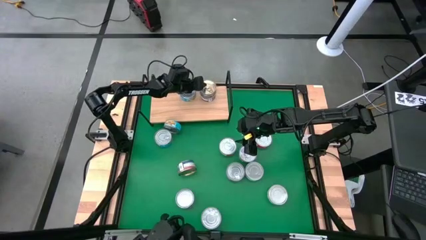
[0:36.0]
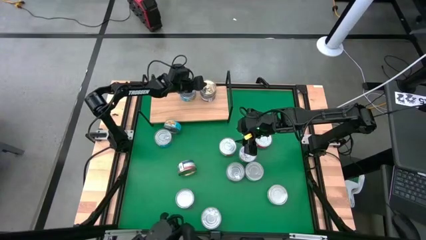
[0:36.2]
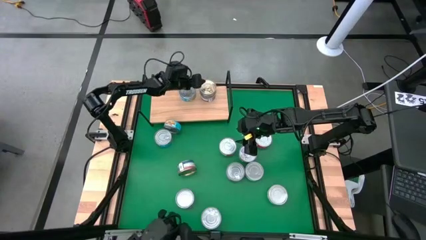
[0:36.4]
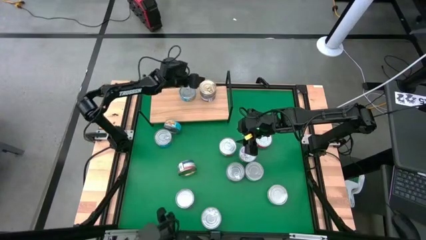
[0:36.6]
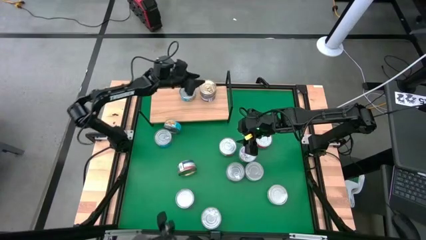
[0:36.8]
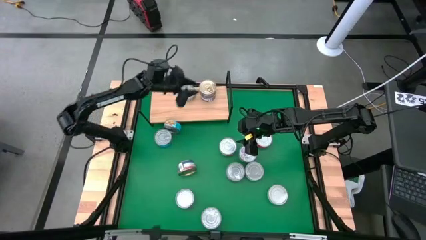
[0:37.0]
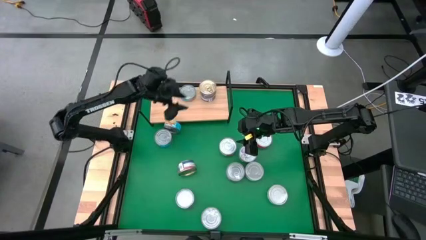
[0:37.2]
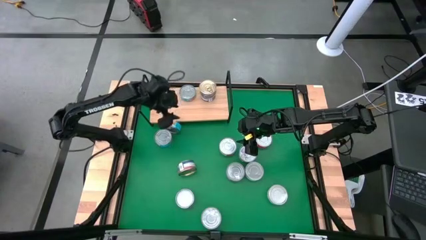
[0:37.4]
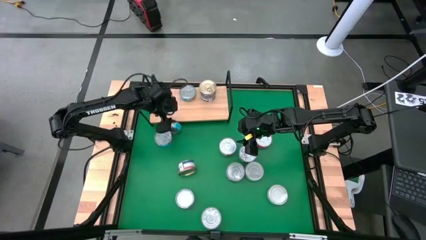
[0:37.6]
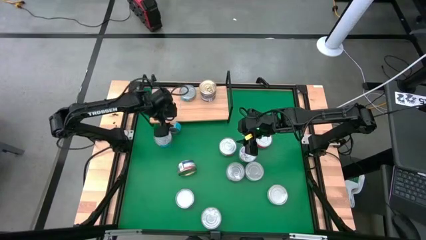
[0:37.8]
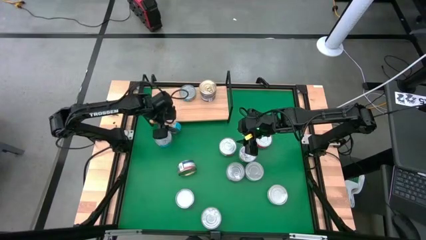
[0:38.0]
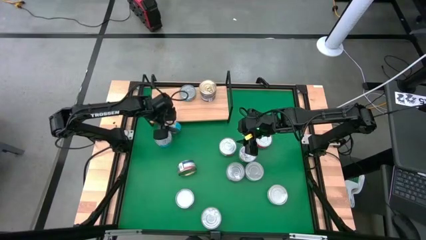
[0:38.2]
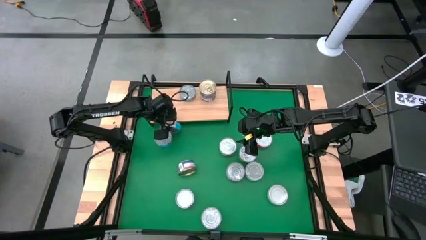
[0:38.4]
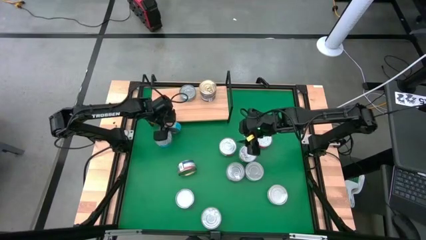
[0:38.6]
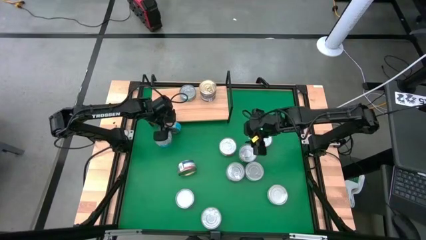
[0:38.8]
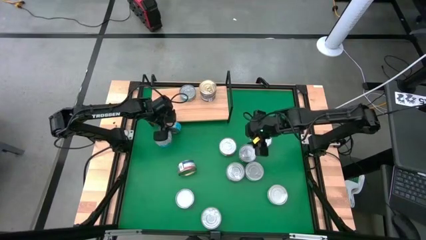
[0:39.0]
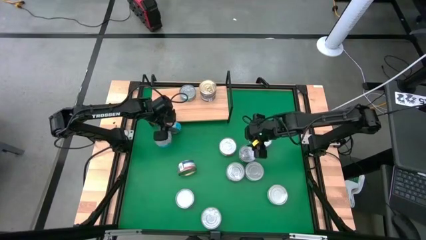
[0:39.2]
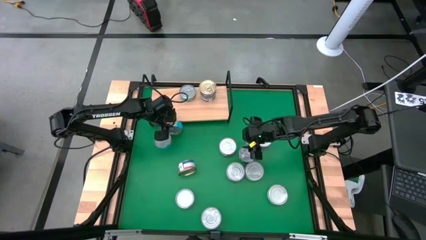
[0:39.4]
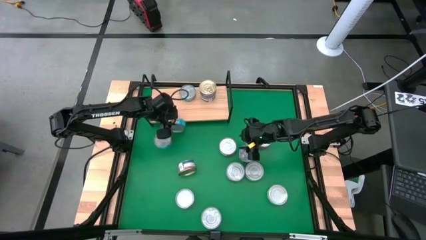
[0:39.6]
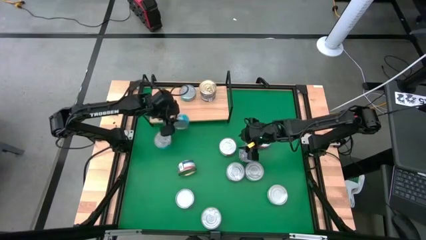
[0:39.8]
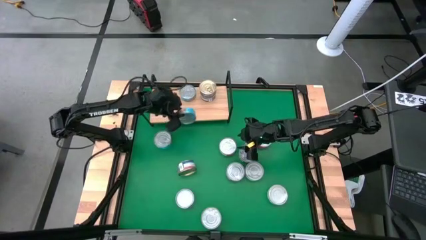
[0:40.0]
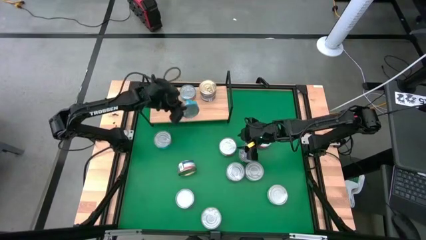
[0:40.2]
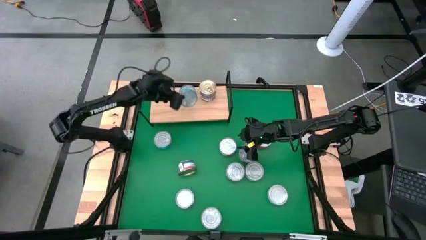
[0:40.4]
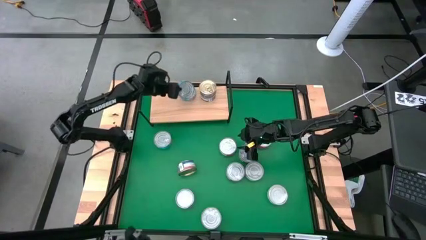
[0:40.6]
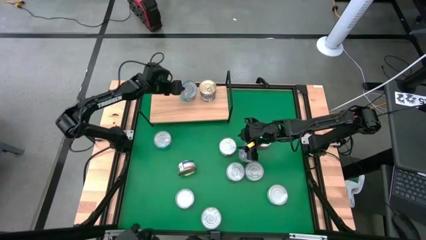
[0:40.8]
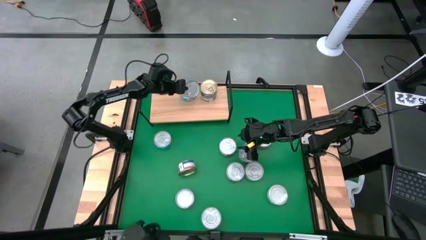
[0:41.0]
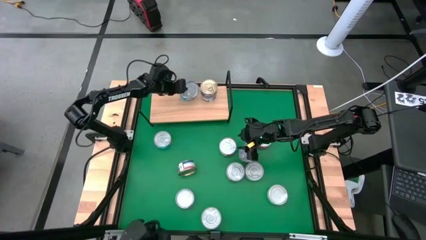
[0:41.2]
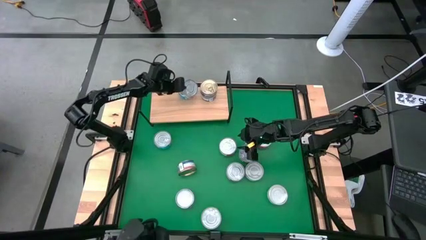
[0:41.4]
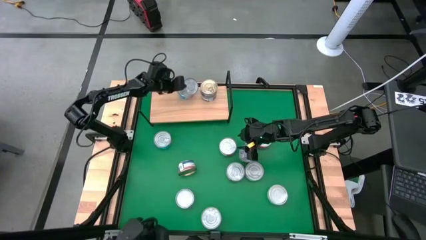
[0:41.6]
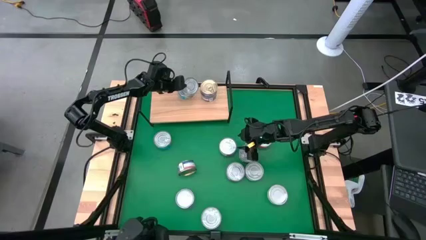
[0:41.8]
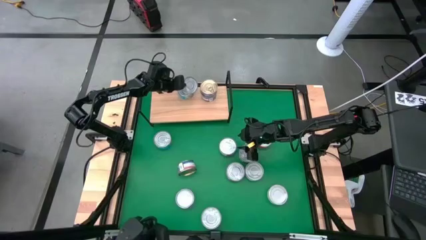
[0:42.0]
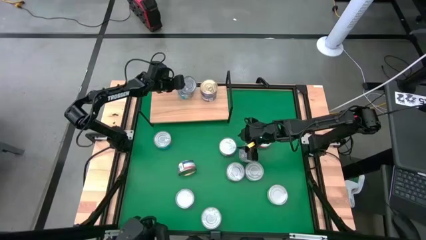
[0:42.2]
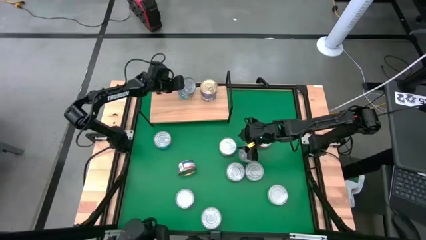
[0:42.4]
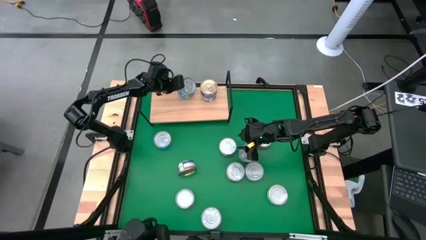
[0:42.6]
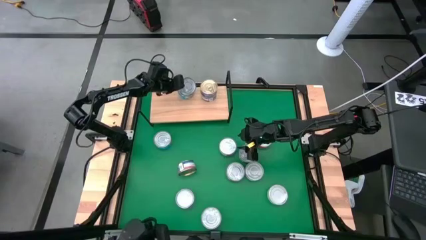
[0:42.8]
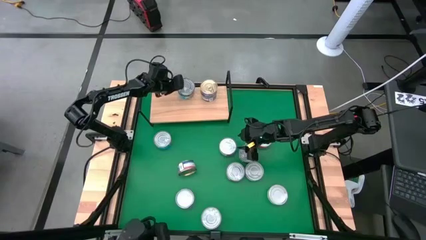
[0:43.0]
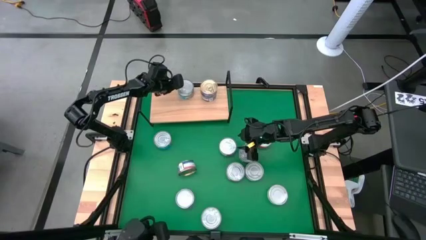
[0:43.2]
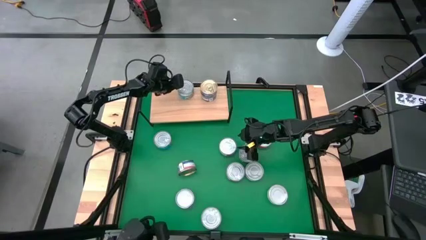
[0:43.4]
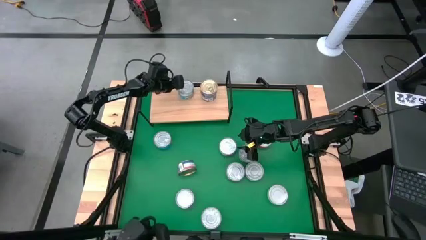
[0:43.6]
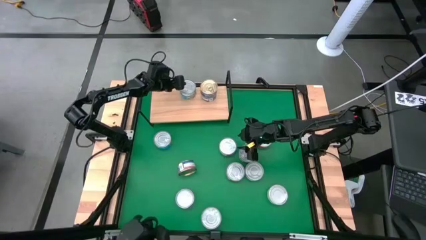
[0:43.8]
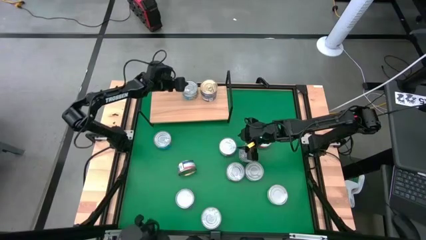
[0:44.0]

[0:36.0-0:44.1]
Task: Stack canned seafood by type on shelf
Stack the yellow blue tuna can on top of the other yellow blue tuna can on the shelf

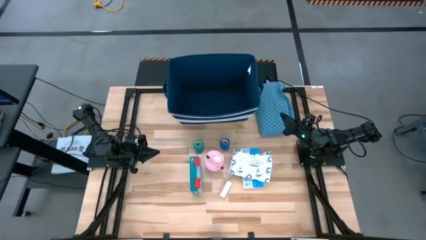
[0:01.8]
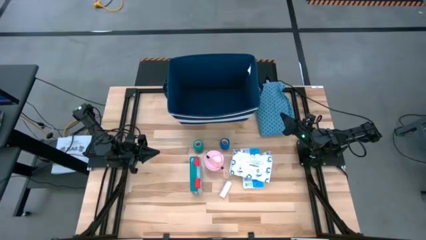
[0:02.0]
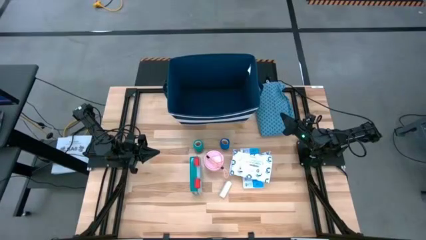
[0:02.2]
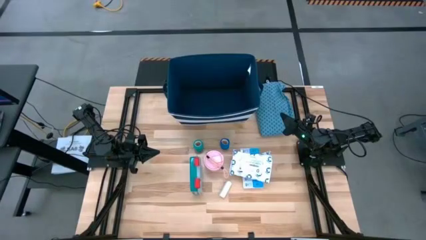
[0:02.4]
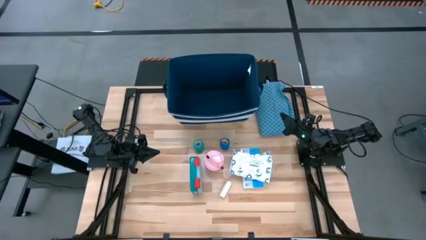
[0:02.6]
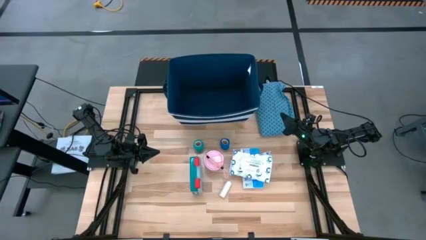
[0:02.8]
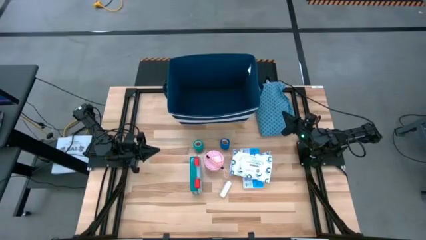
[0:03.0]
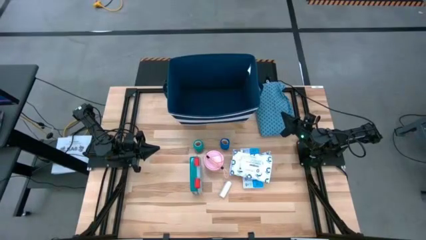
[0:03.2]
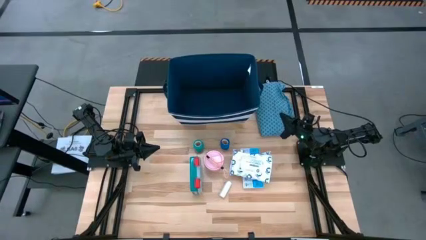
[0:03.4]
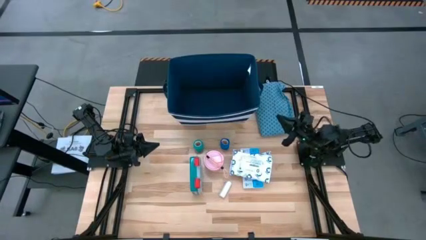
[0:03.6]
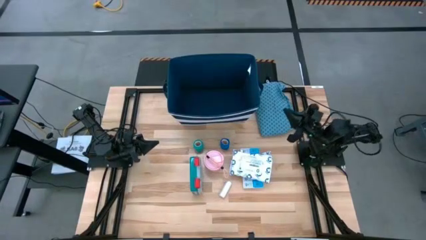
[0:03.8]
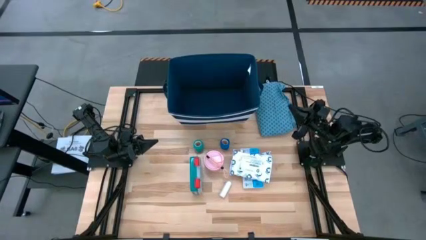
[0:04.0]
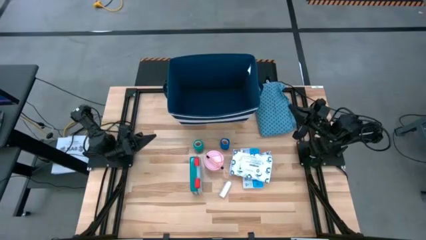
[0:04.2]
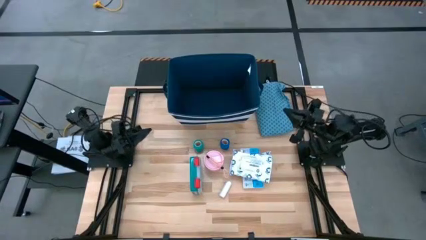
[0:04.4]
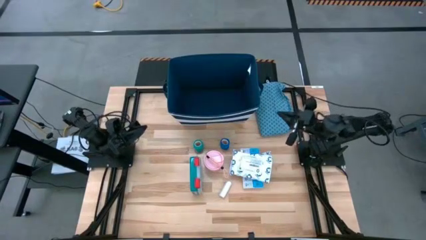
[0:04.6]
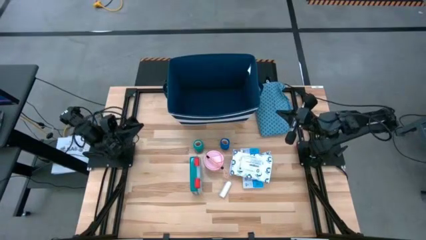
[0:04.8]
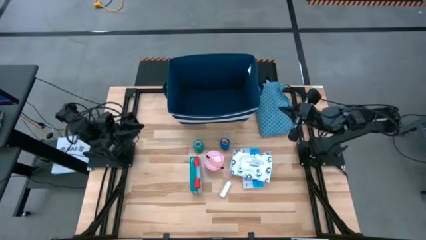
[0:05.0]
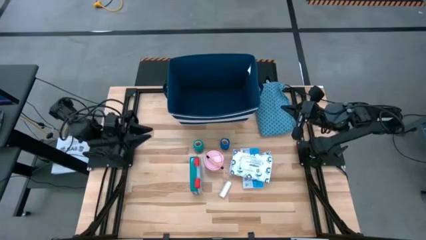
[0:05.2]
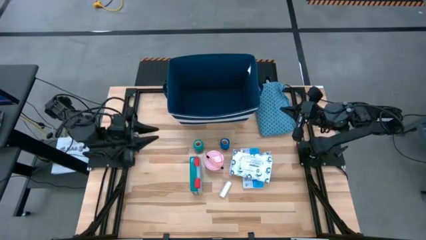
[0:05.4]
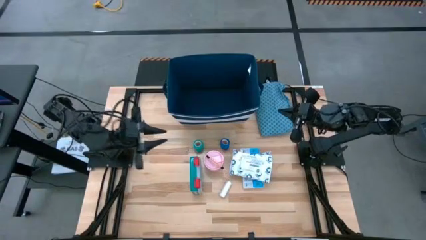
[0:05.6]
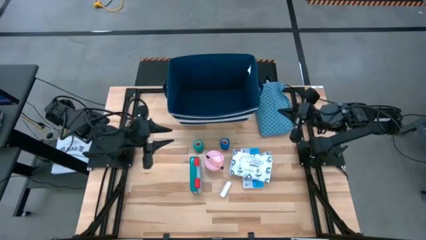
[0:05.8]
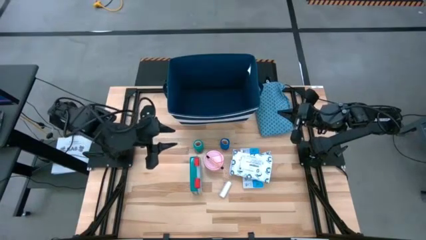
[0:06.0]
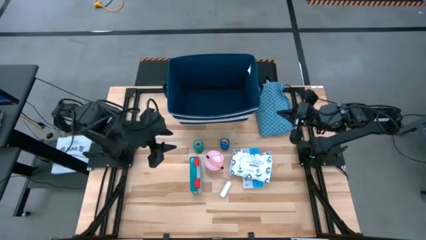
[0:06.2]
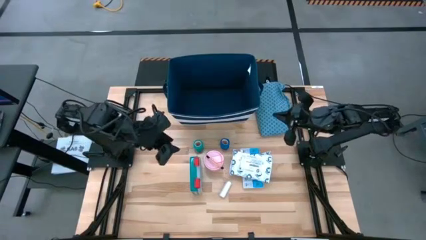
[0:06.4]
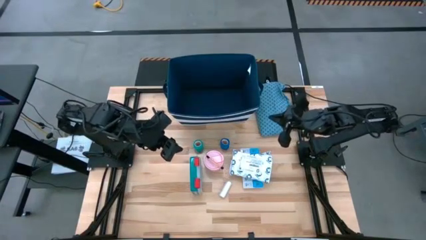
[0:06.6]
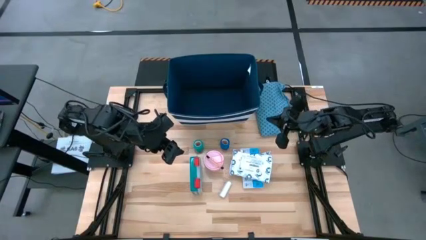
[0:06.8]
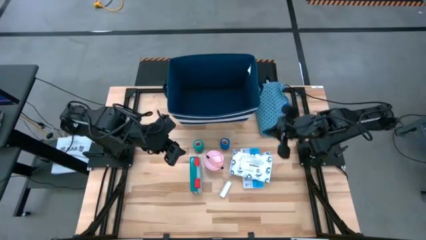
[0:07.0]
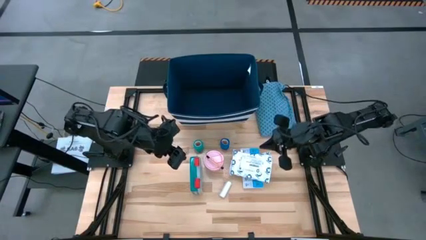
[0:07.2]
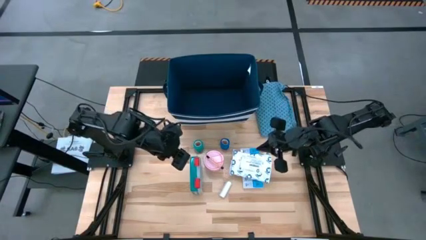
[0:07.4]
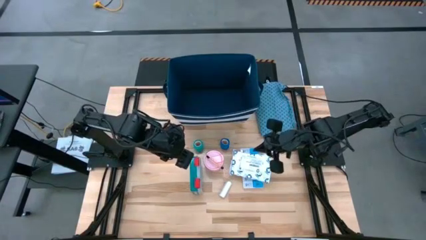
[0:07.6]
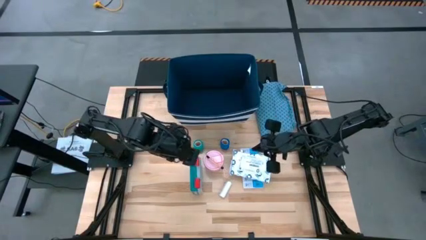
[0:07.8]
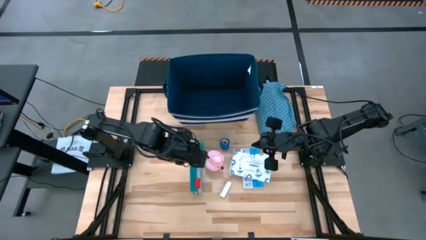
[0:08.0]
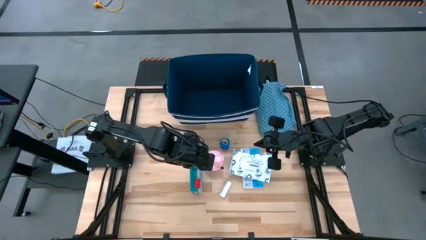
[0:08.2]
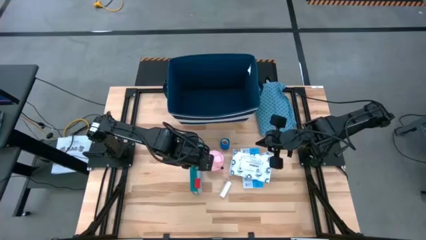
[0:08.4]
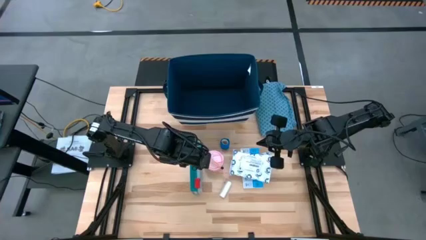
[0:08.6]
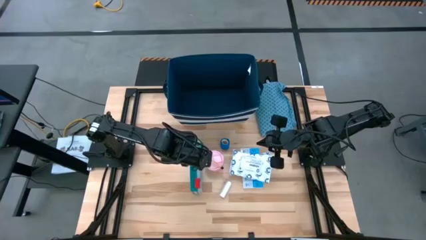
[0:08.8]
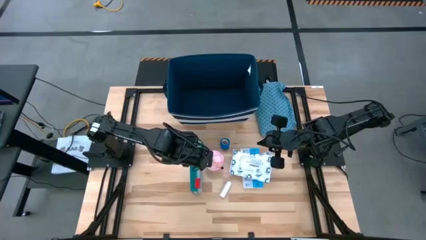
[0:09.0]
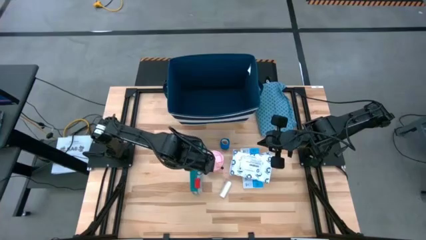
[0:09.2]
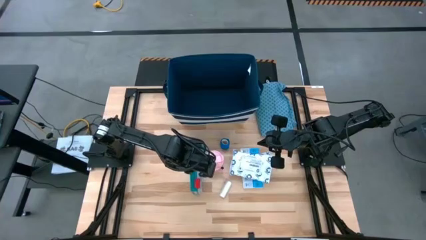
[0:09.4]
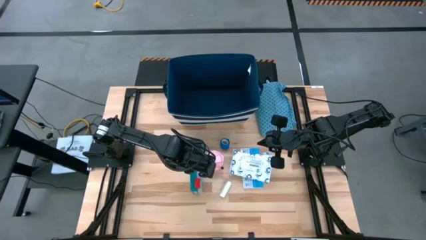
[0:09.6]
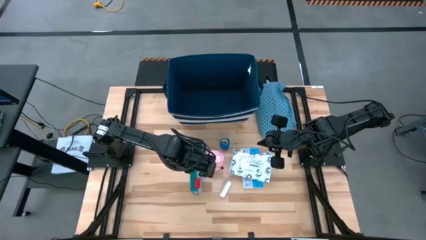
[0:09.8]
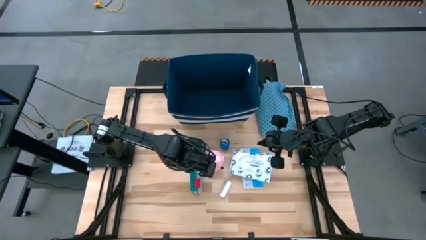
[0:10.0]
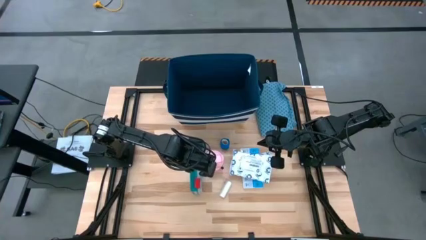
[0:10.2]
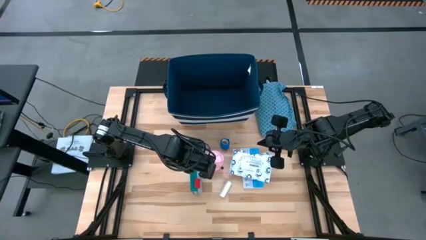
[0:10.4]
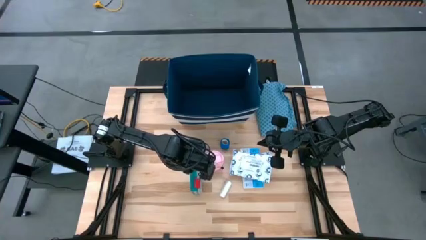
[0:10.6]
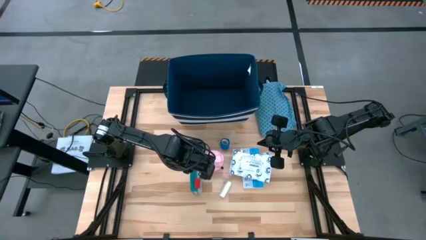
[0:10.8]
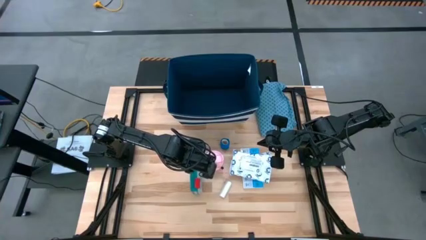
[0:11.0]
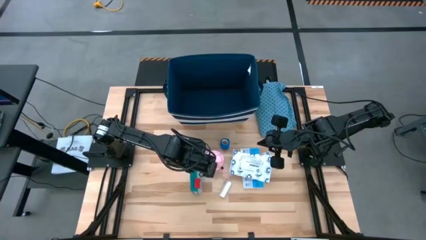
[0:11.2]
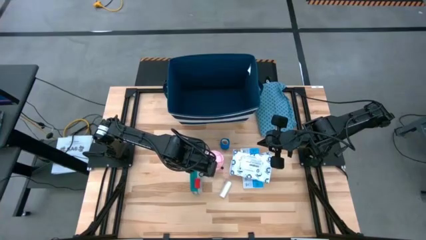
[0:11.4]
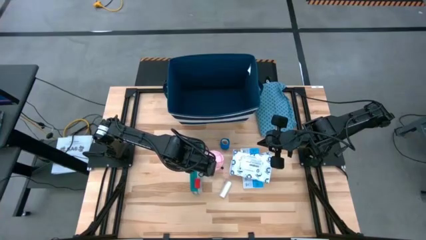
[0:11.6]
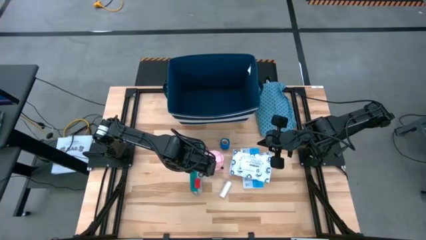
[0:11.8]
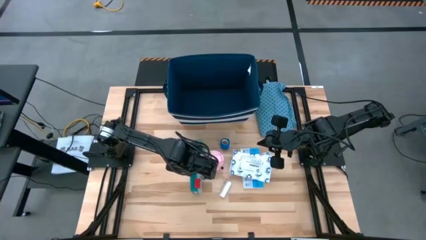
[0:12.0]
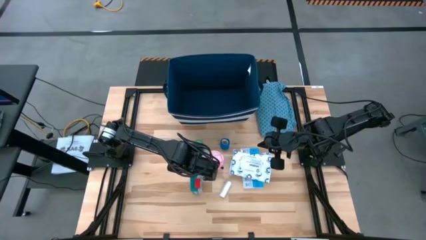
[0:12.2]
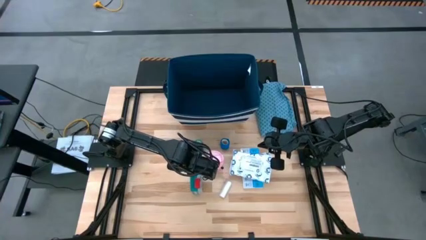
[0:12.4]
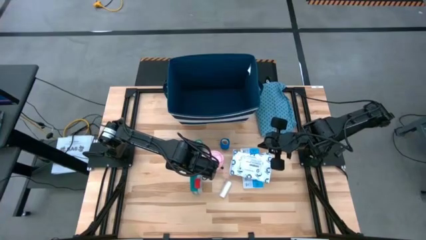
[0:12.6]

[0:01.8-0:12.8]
Task: Pick & place medical supplies in basket/bin
Put the first aid box into the bin
